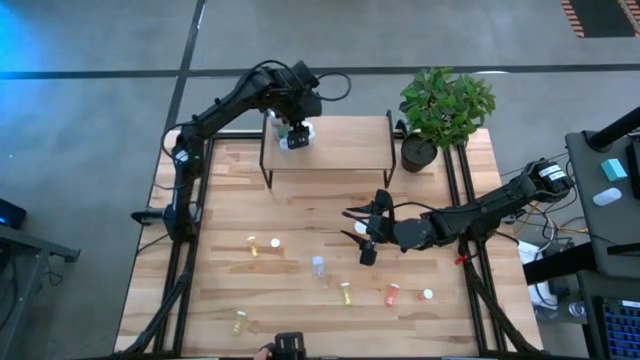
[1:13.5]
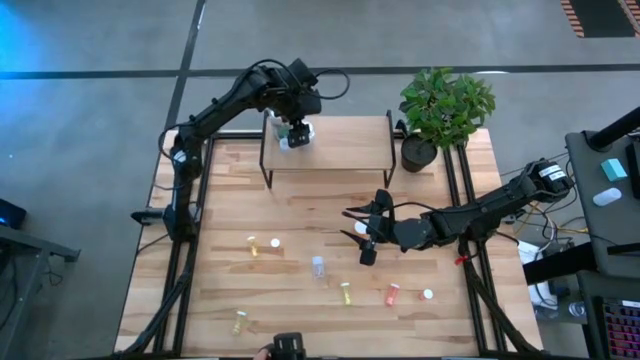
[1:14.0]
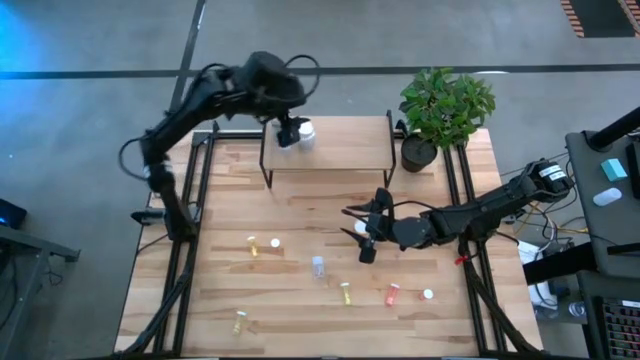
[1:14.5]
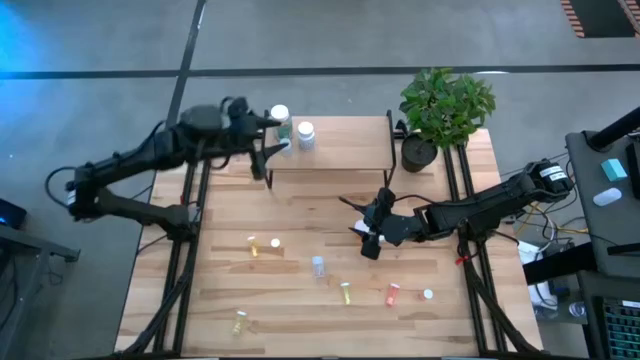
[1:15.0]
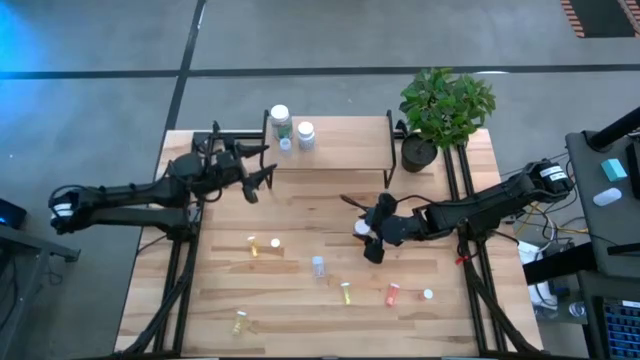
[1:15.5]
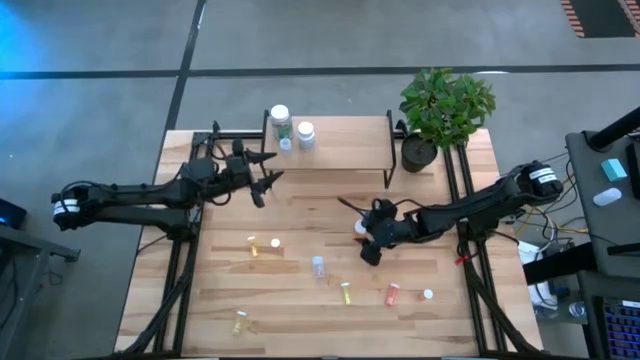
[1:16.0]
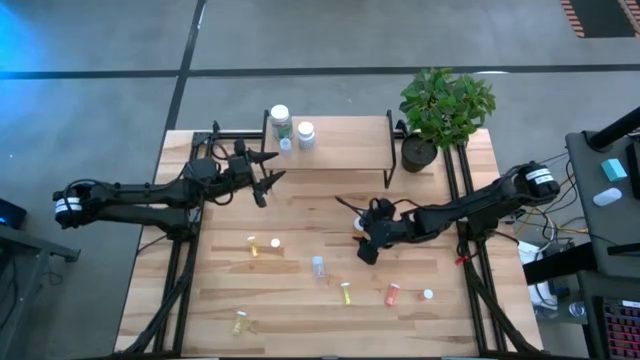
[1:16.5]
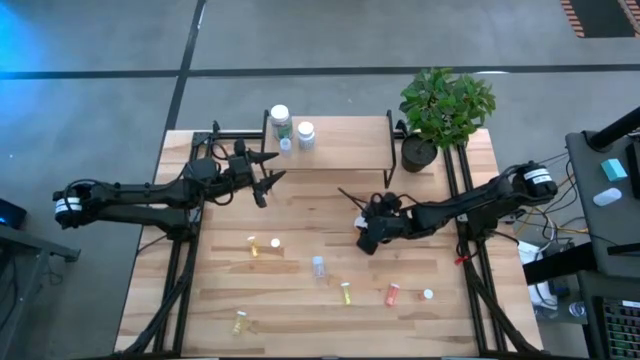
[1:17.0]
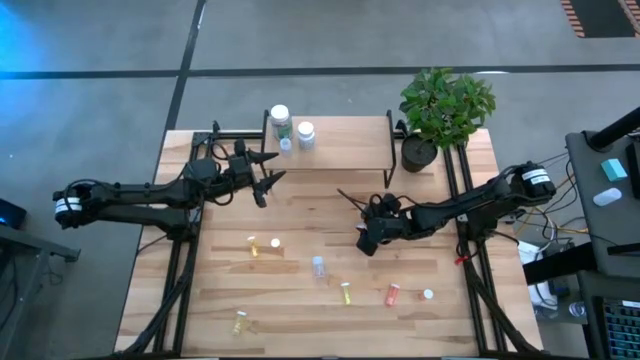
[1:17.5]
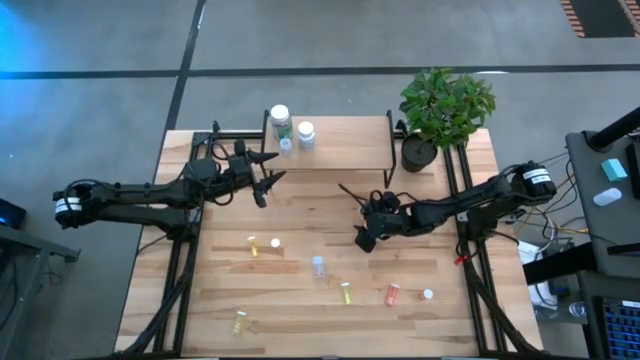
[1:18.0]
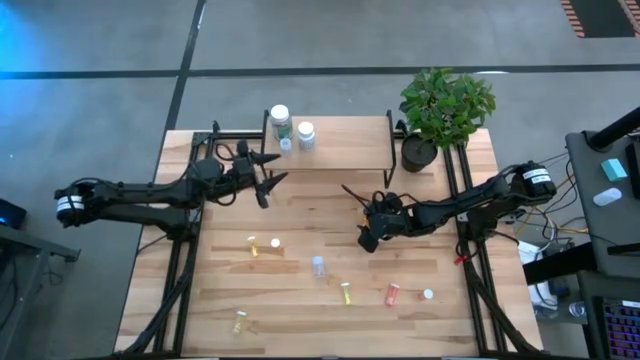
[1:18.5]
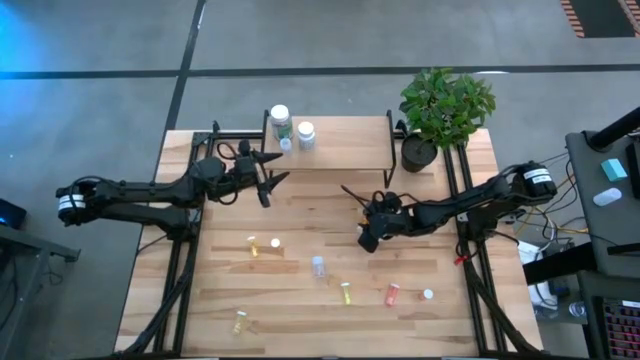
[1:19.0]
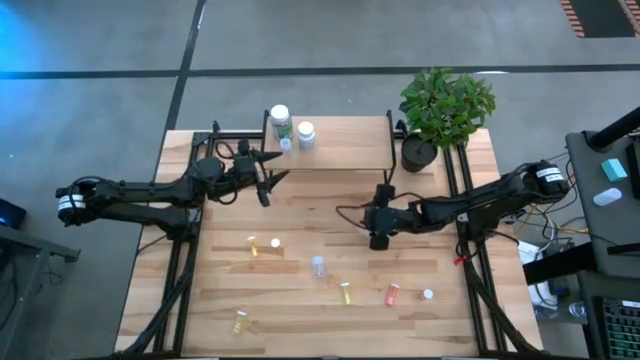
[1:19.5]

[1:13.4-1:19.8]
Task: Pick and place medicine bottles onto shelf by color
Put the orange pill bottle on the shelf

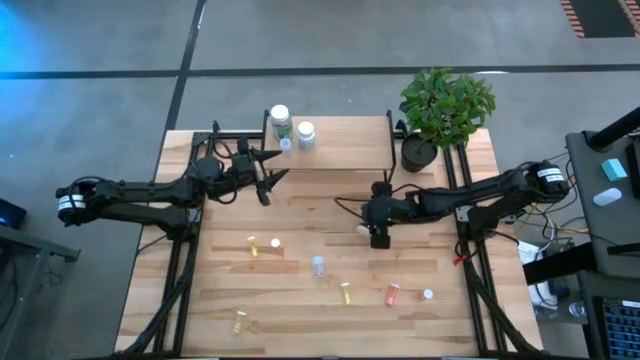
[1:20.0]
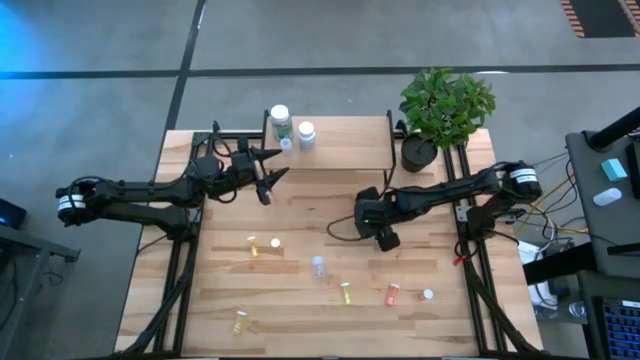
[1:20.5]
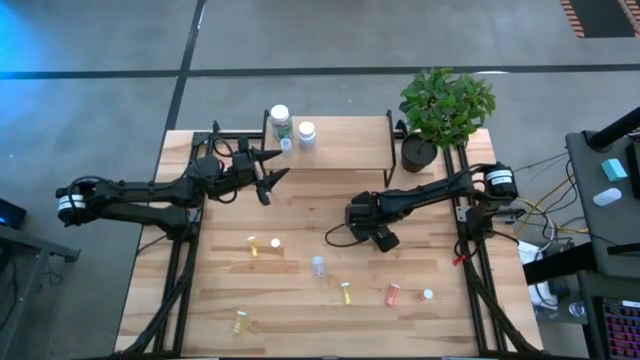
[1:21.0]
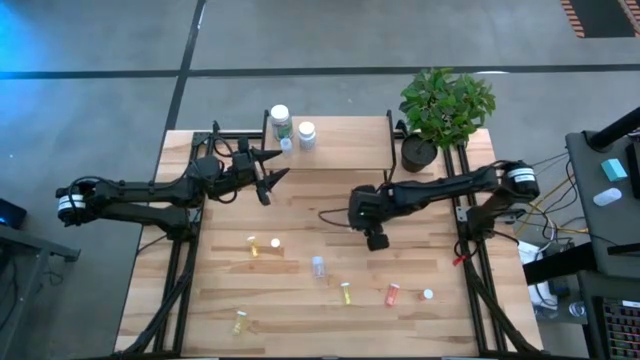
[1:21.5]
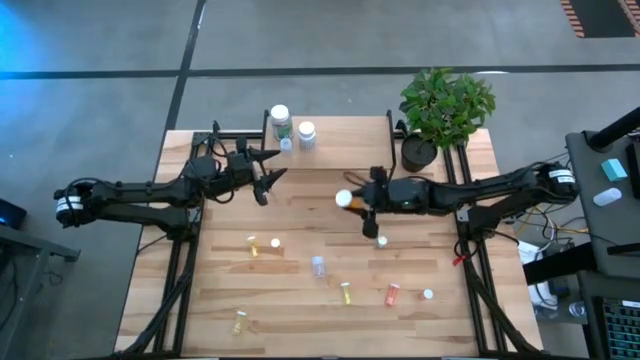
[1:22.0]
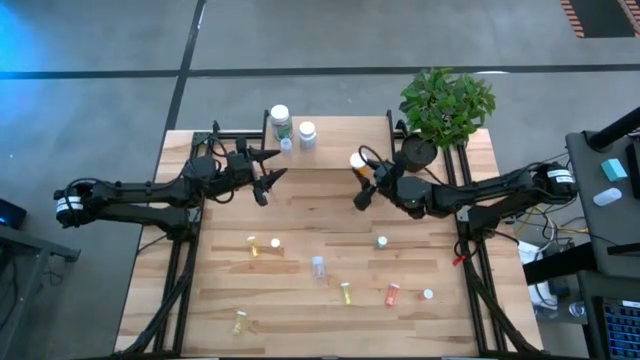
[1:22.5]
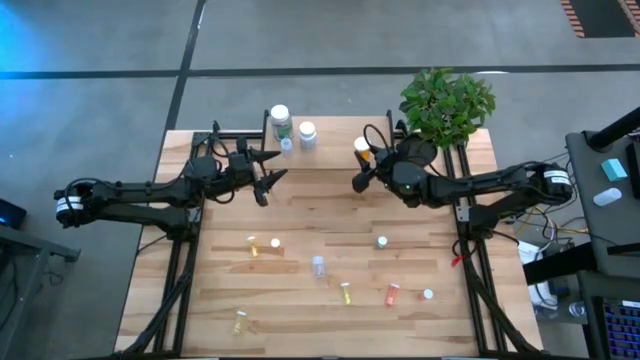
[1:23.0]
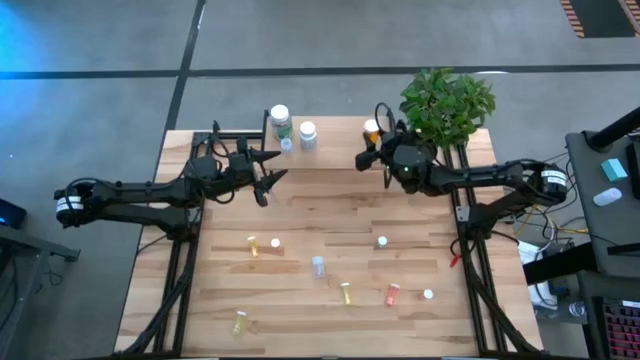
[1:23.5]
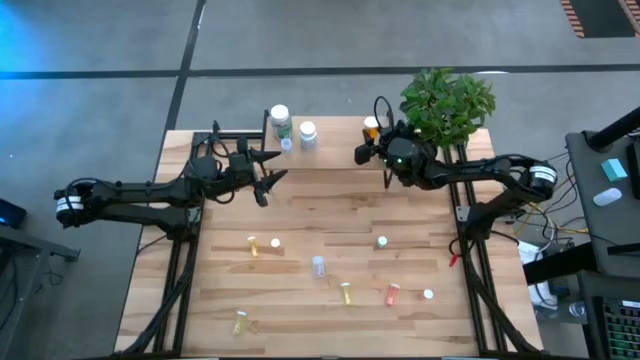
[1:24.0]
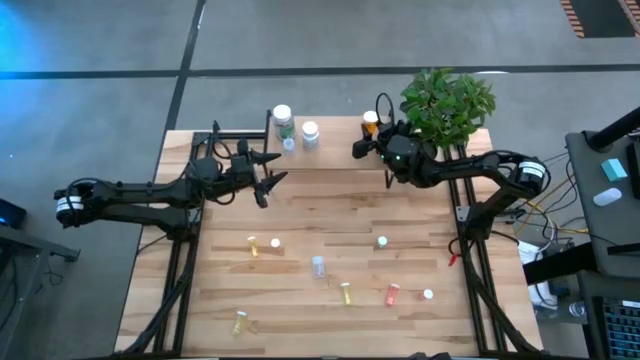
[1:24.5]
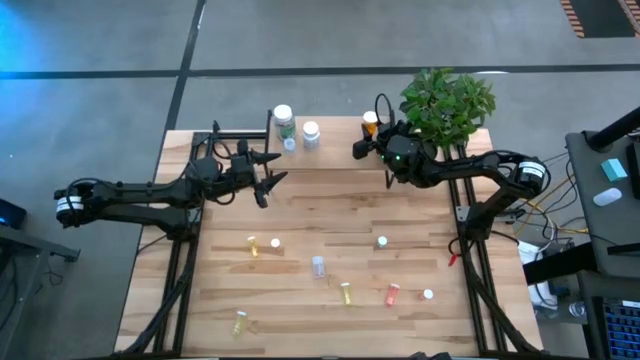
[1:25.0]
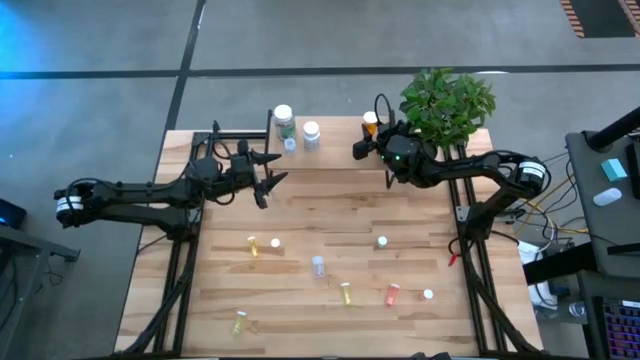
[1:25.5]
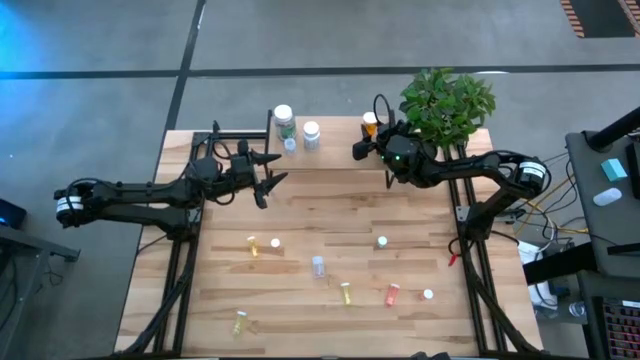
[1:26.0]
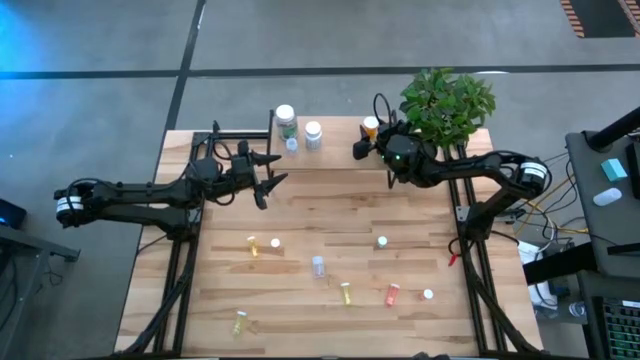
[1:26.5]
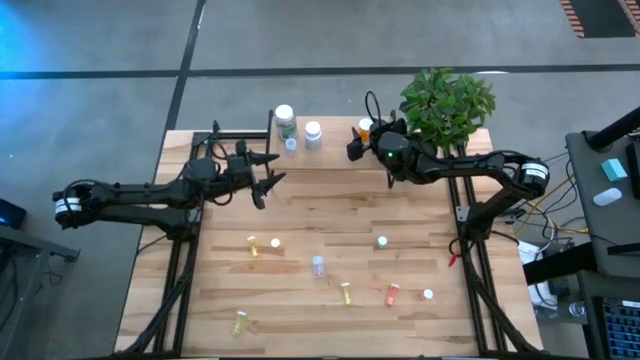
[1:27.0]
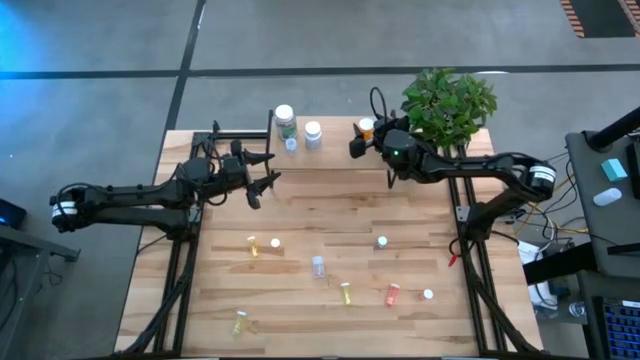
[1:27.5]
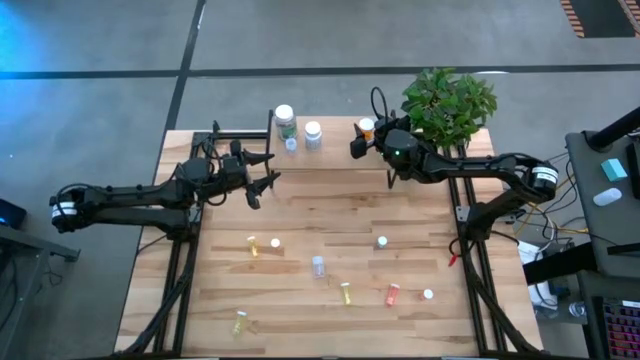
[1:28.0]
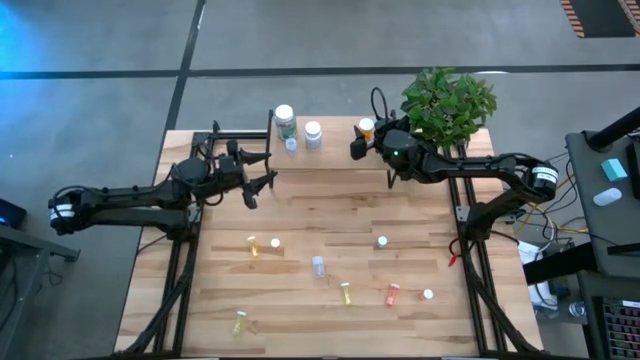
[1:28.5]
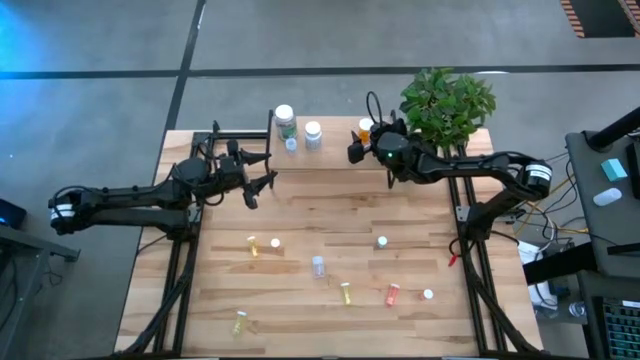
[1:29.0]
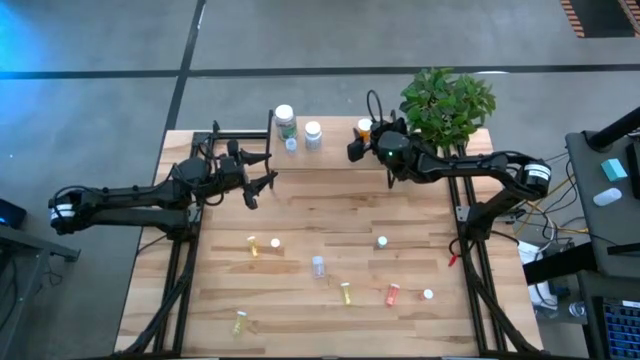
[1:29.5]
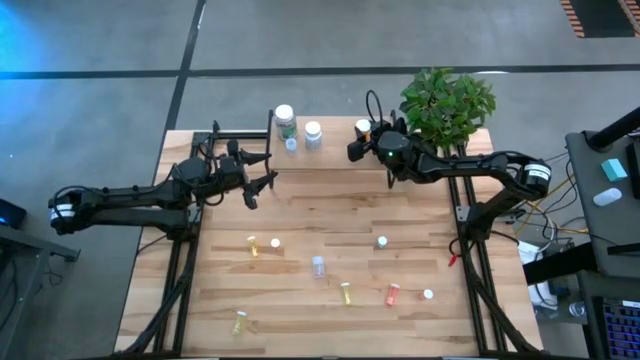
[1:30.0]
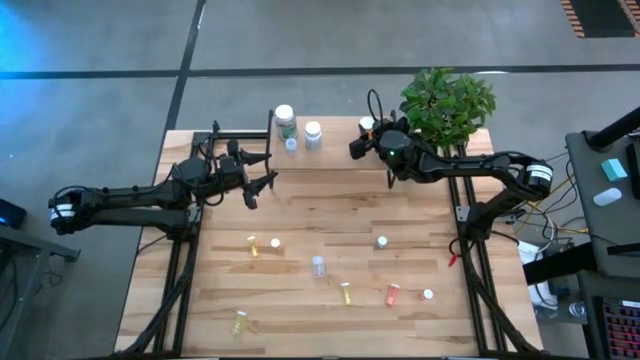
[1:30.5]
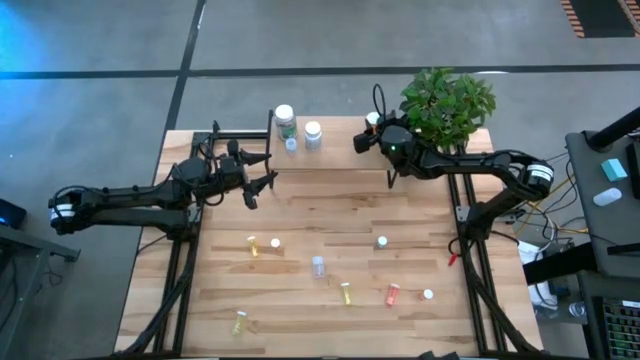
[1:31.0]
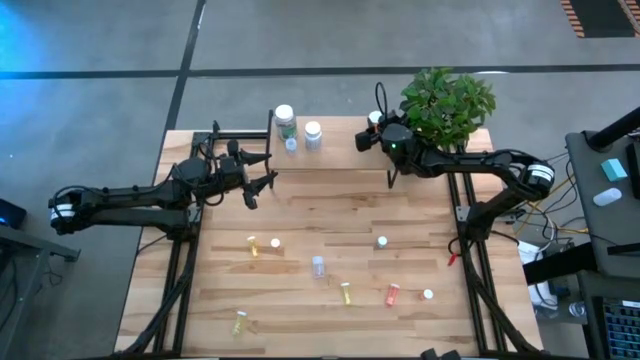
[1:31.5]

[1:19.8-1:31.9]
Put the orange pill bottle on the shelf

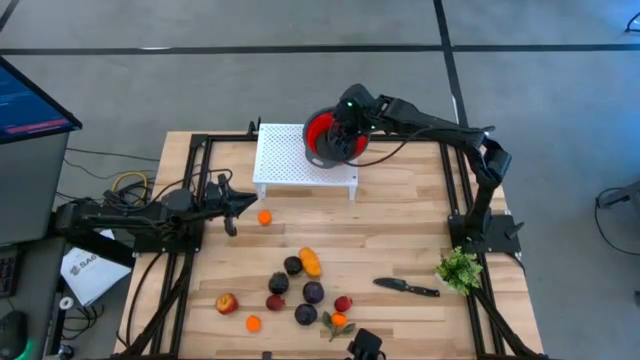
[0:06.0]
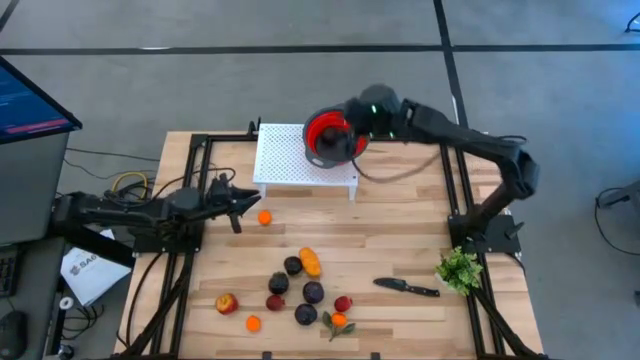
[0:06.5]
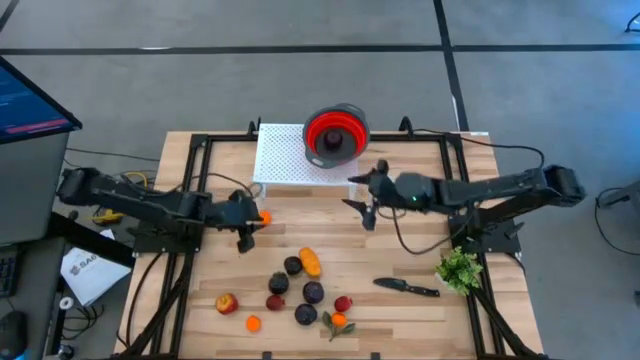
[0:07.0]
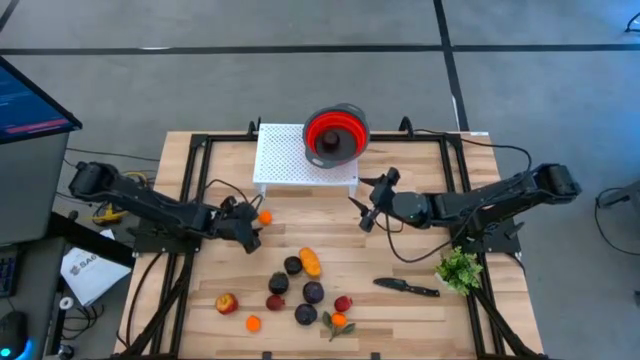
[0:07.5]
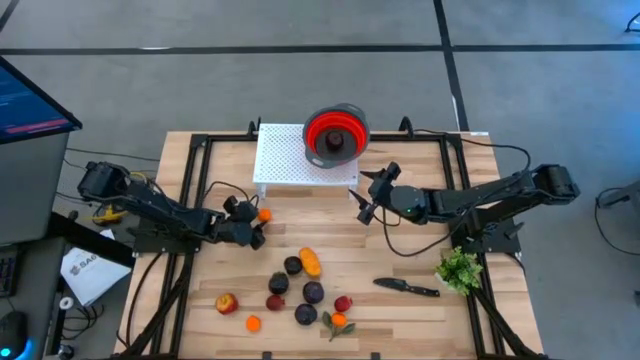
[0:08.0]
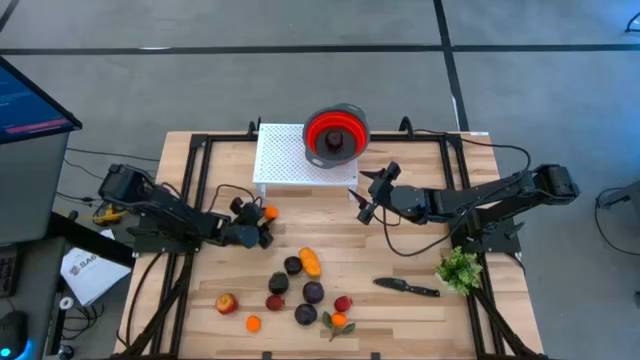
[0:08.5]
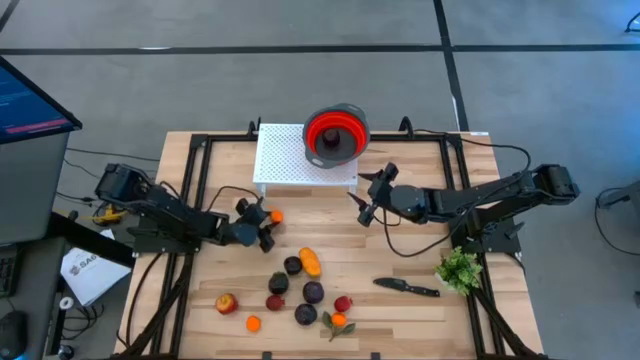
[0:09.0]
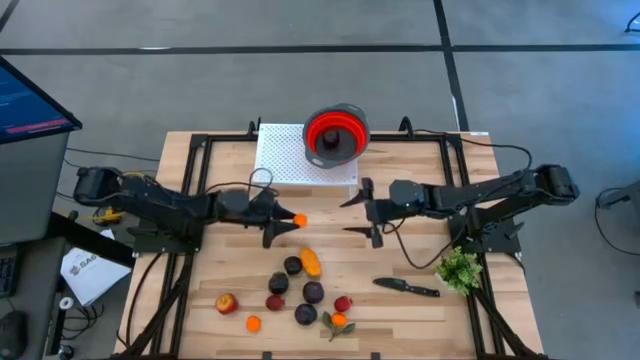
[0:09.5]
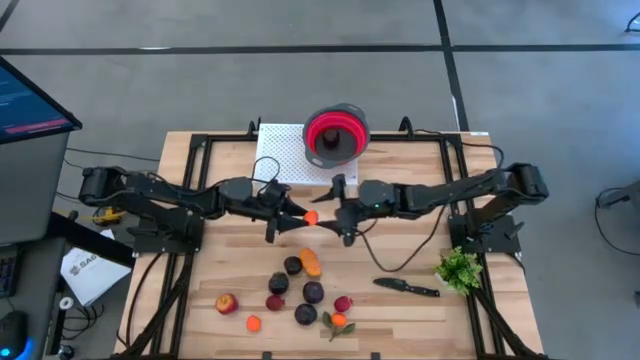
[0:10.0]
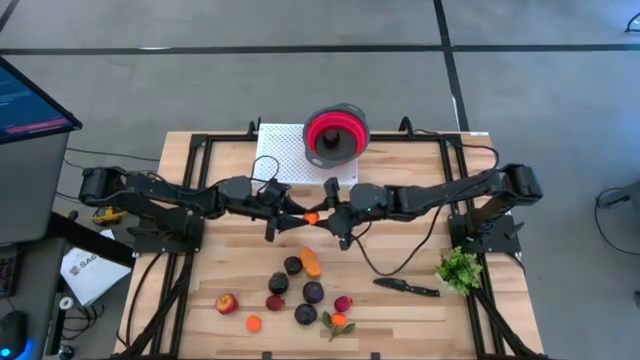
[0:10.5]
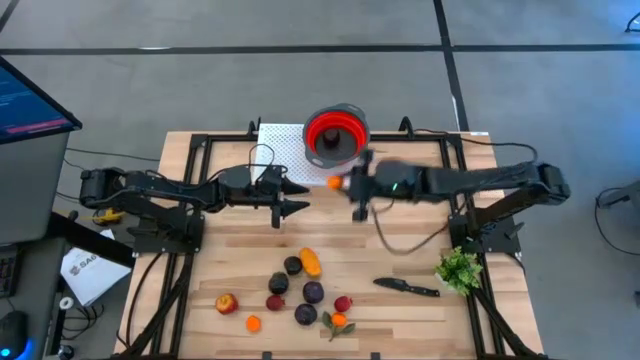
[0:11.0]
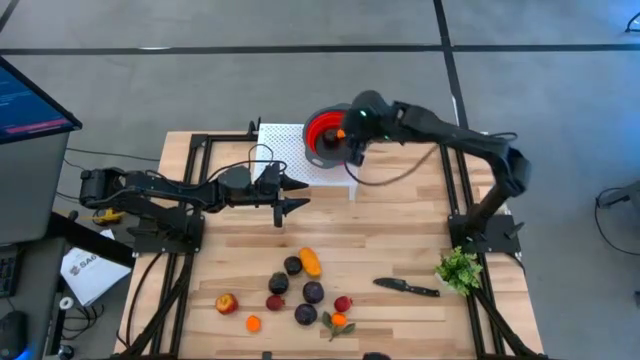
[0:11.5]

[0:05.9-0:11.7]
Task: Pick & Place Fruit
Put the orange into the red strainer on the shelf
